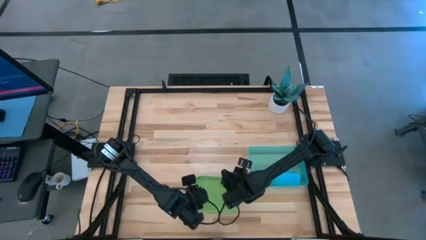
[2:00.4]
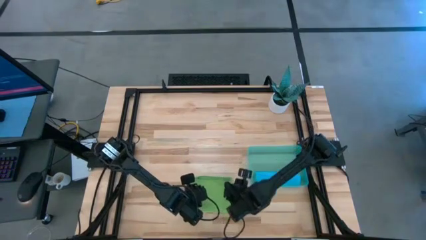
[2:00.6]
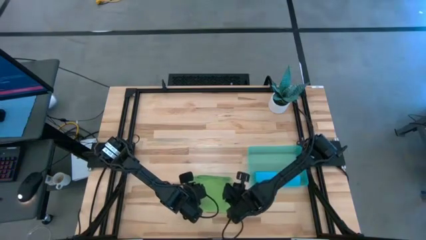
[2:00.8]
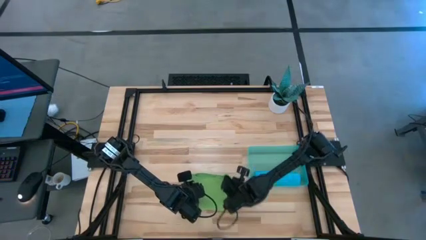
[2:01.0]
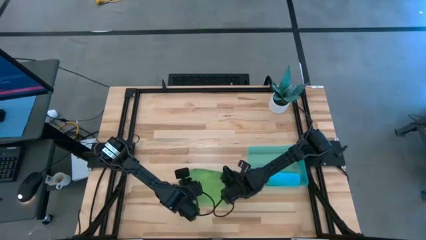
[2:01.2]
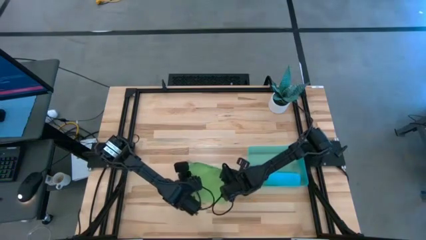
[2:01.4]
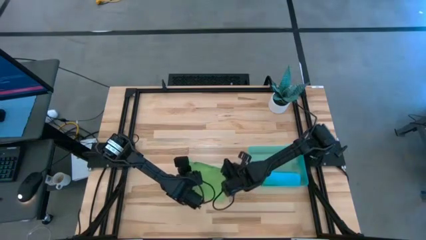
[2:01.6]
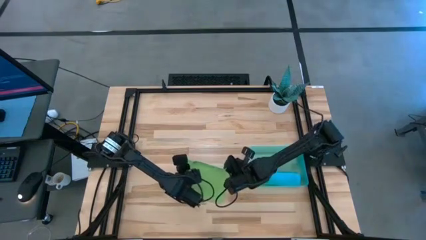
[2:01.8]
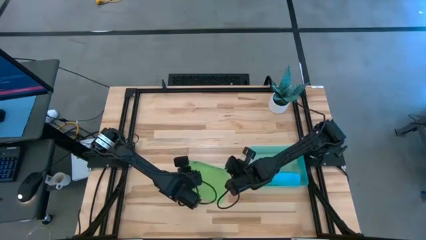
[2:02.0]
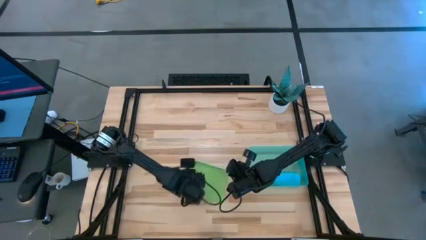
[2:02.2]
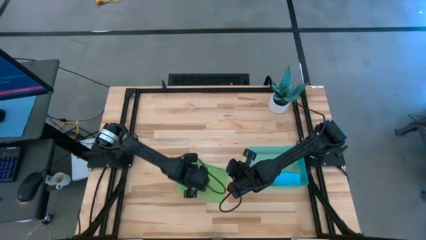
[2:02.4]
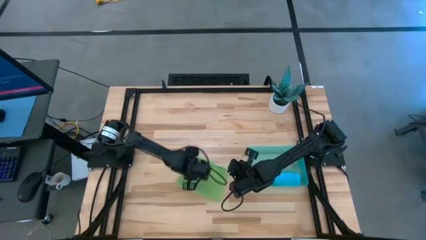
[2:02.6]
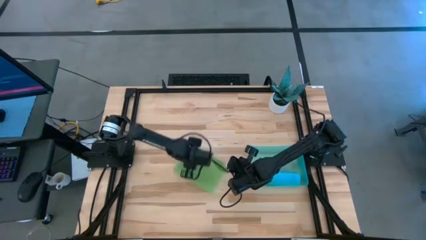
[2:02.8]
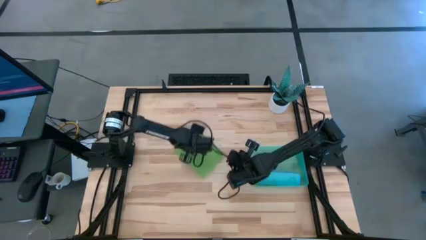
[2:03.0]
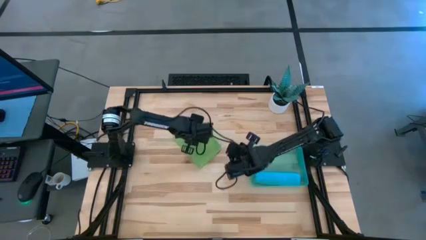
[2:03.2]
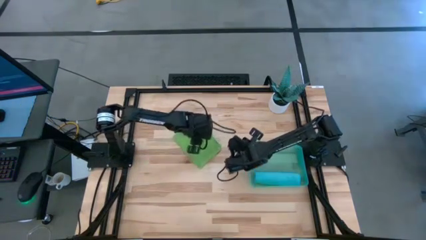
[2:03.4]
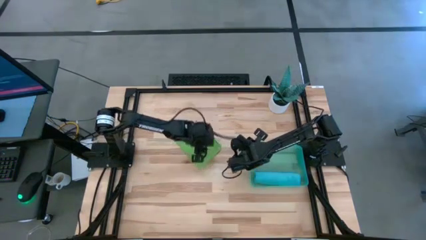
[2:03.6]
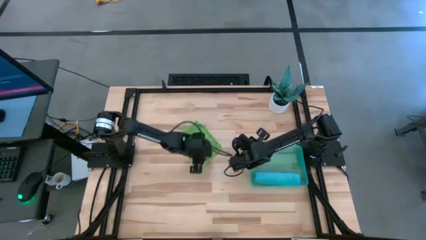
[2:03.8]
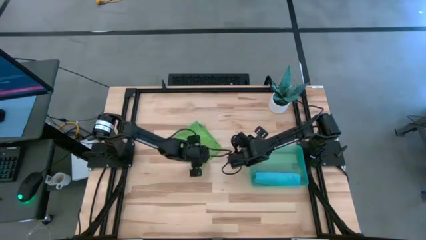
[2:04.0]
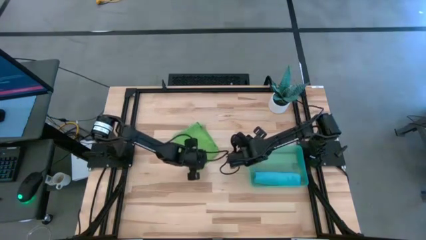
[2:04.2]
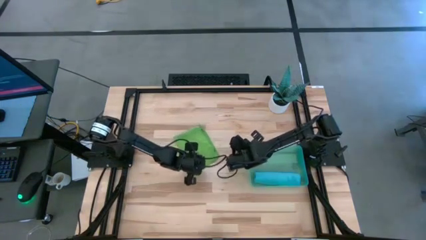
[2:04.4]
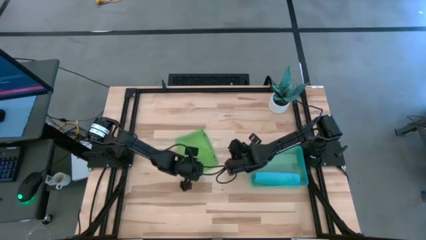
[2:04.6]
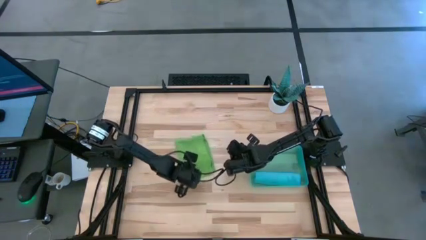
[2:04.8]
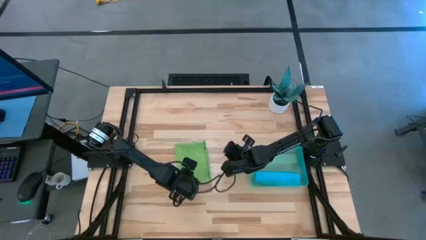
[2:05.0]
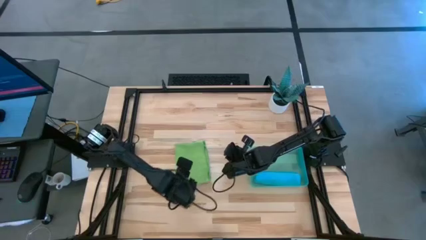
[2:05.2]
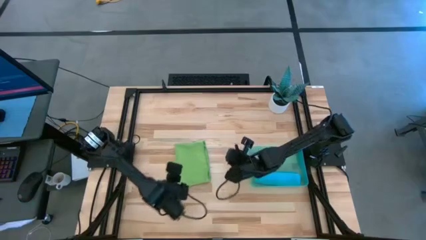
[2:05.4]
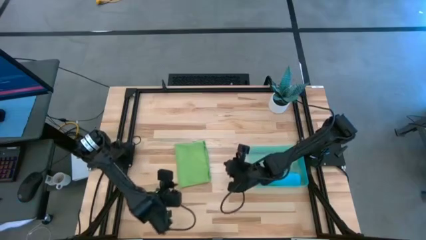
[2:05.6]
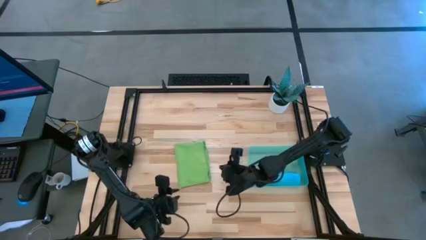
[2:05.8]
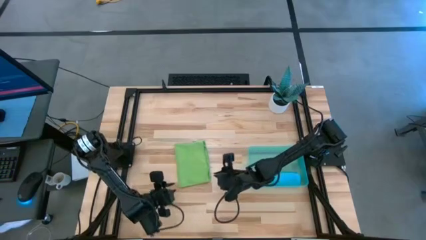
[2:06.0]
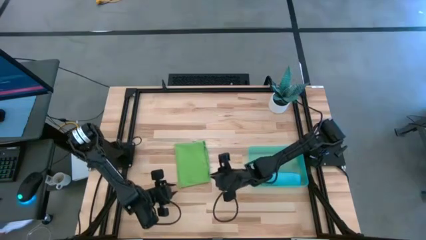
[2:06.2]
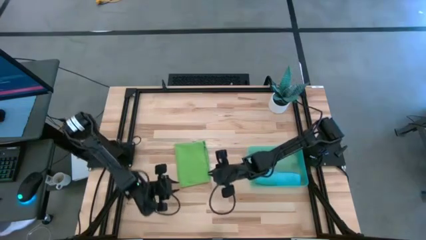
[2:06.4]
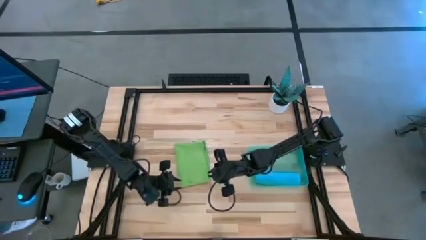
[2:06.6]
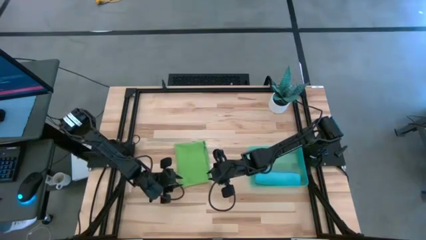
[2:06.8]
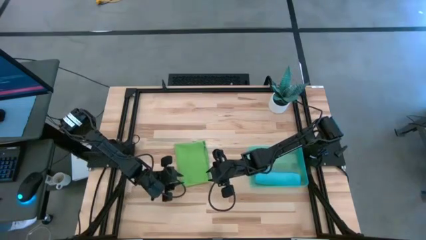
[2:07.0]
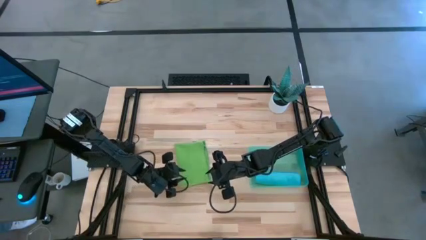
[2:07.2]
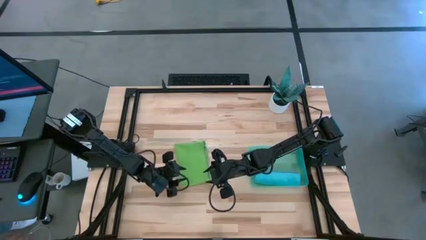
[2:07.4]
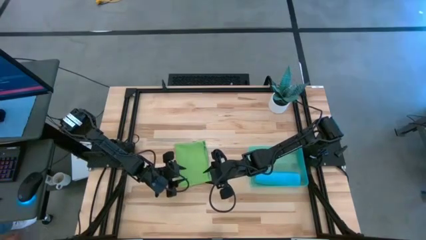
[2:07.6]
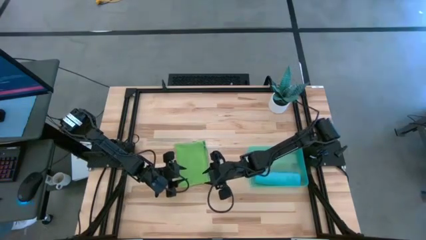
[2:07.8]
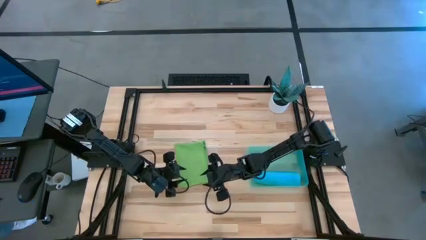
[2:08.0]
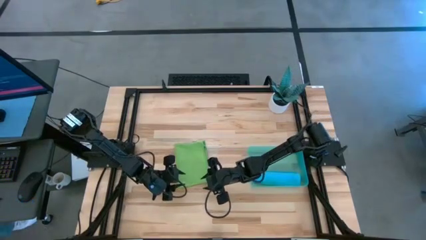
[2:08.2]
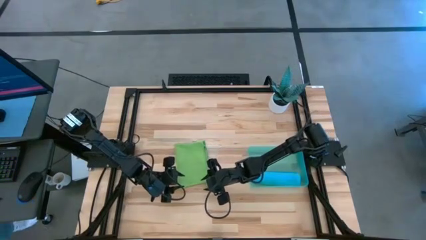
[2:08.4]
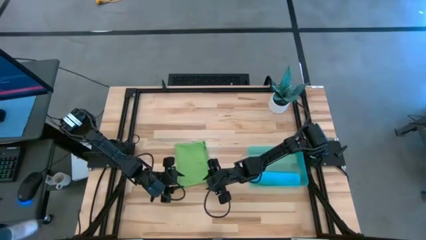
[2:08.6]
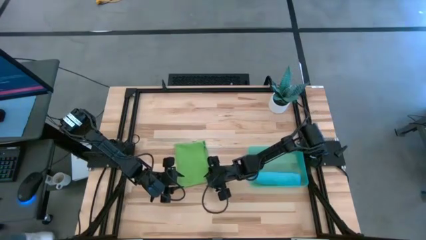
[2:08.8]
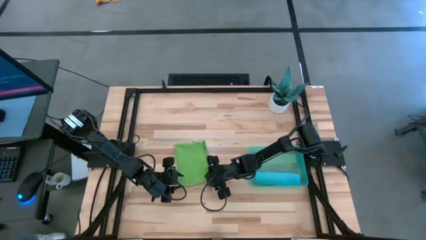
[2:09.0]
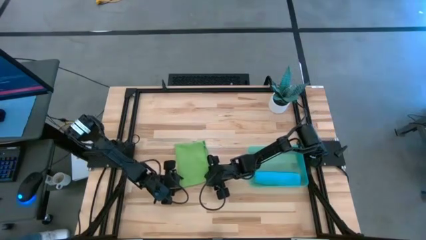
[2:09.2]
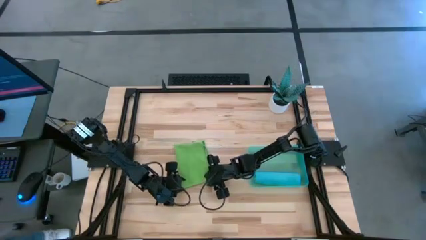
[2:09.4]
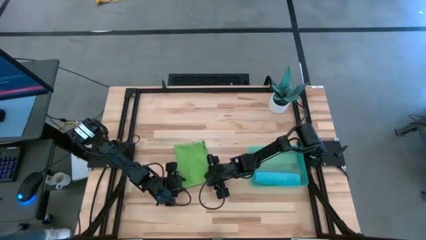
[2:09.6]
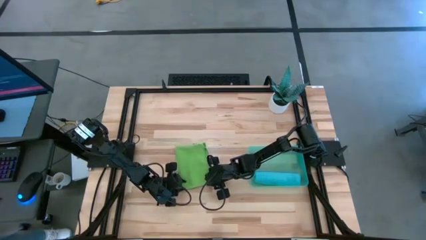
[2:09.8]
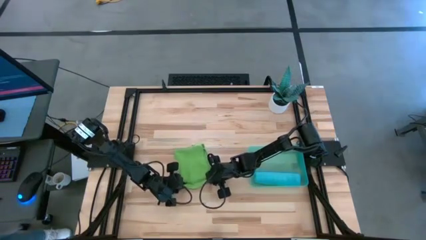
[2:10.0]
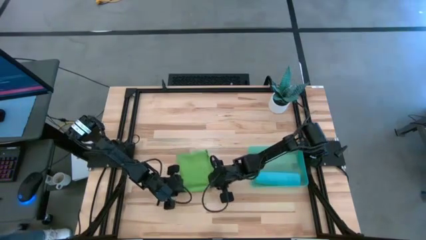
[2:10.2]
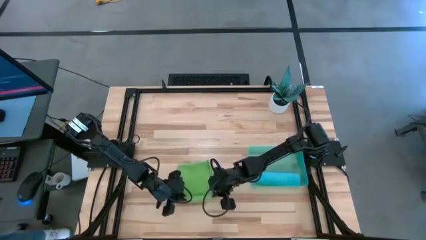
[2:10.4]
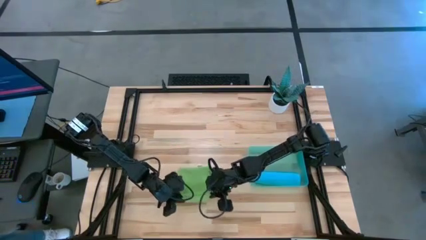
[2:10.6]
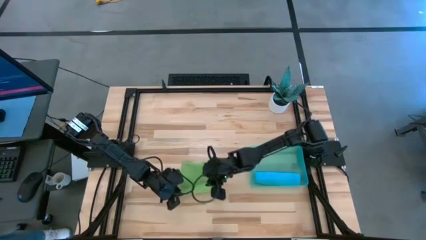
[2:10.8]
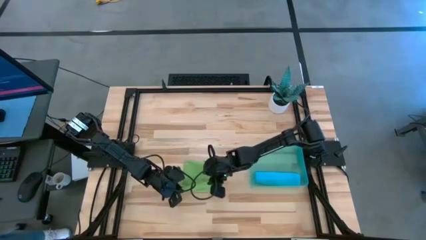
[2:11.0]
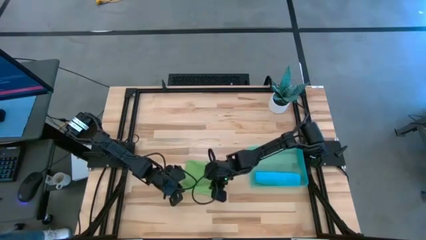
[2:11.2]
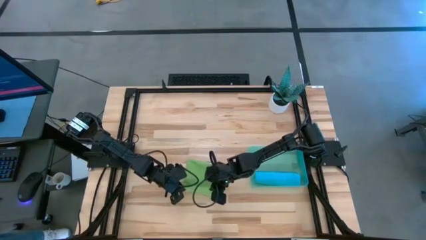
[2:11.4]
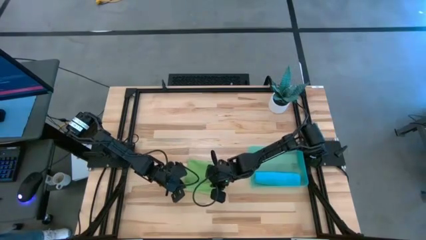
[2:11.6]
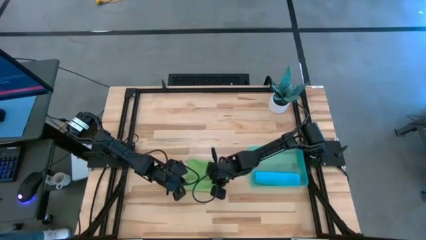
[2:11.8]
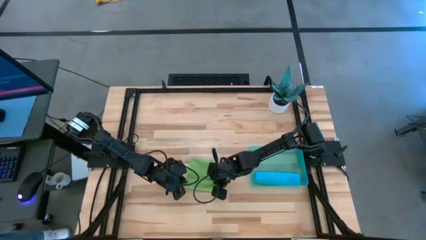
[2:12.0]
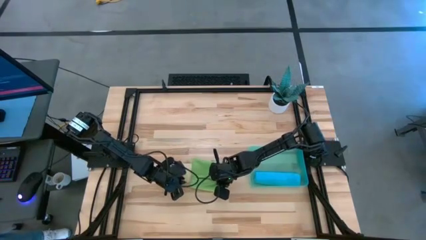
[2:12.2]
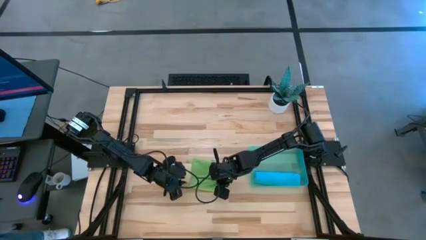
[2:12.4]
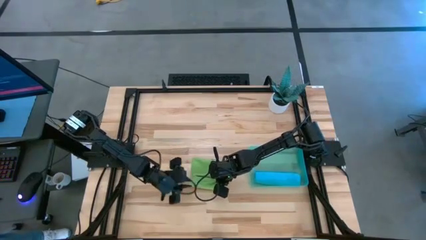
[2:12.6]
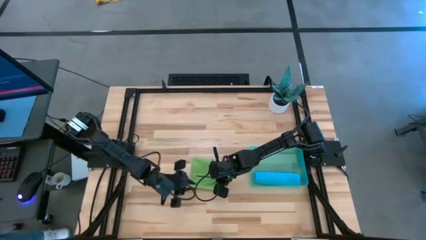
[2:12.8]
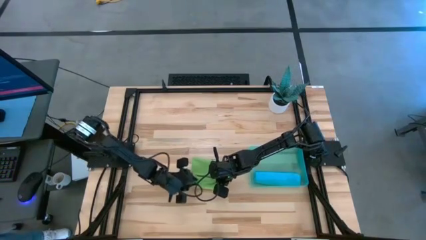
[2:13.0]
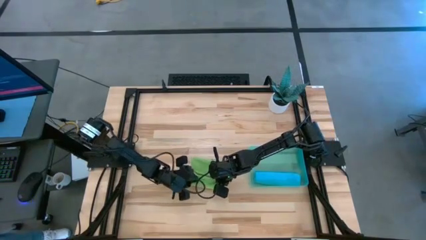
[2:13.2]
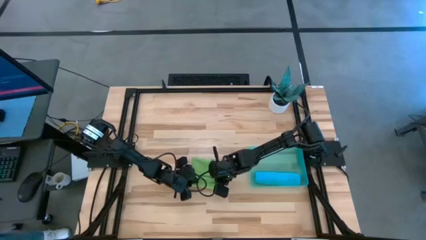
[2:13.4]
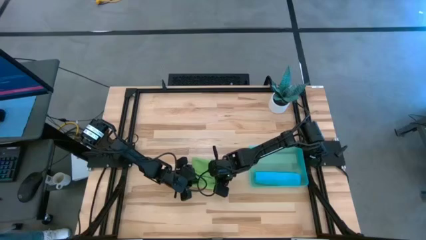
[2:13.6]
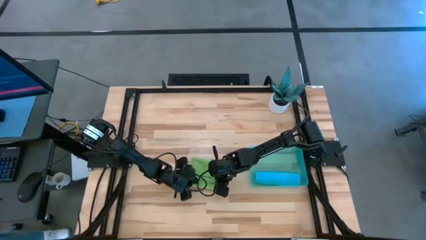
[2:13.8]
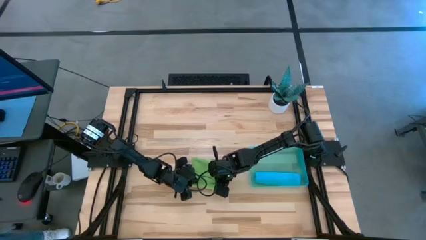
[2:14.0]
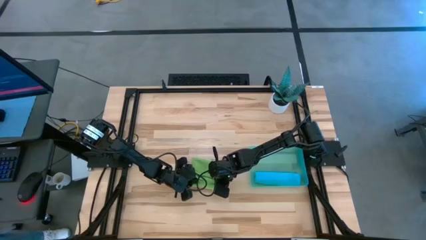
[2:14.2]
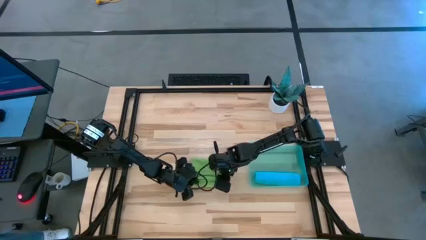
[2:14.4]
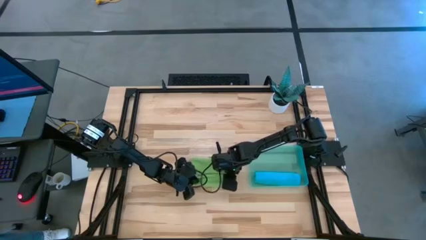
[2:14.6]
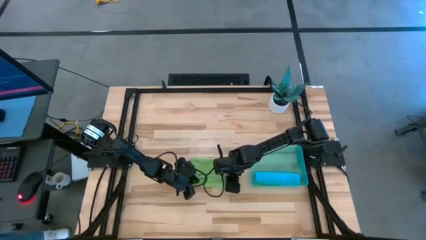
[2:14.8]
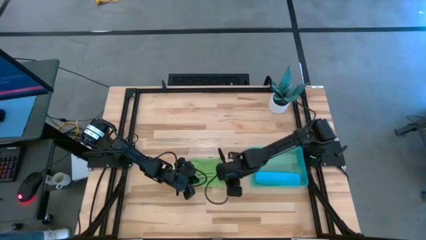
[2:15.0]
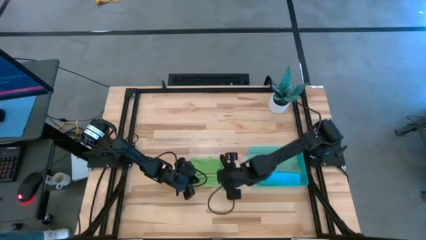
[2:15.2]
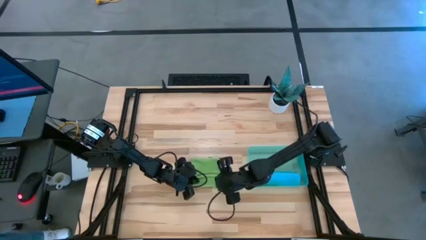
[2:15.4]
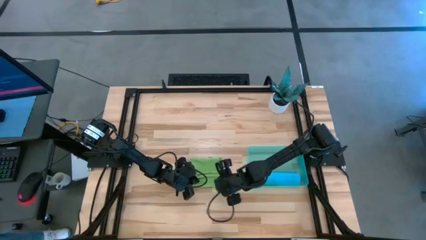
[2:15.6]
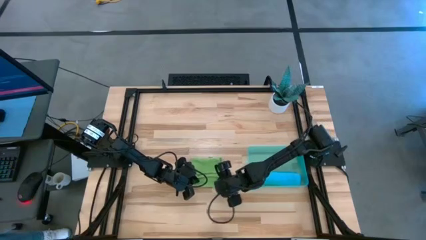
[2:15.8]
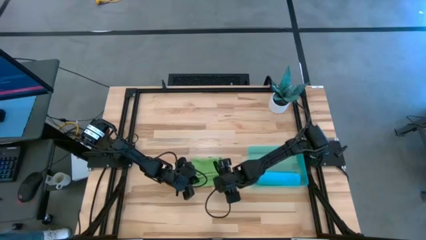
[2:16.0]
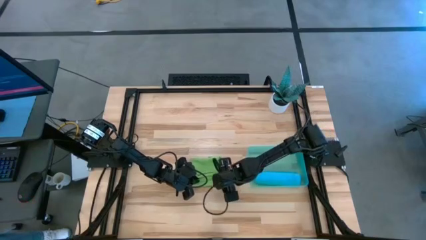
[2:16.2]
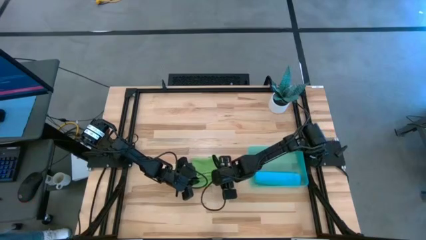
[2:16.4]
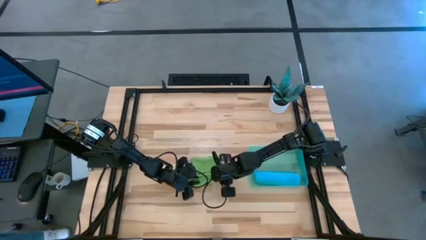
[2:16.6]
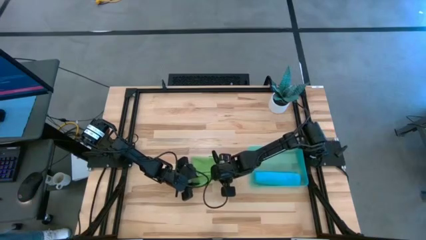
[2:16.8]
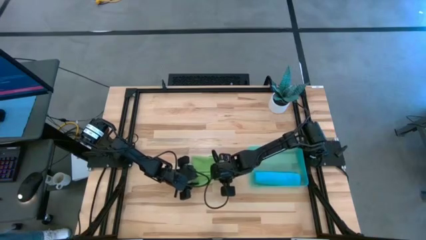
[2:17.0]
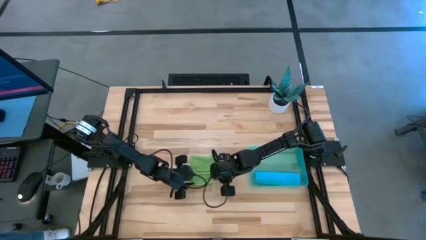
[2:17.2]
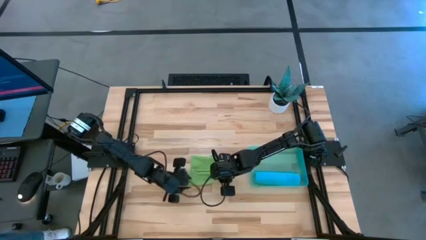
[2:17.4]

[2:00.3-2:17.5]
Task: Roll microfiber towels into tight, uniform cylinder then place into a basket
Roll the green microfiber towel
